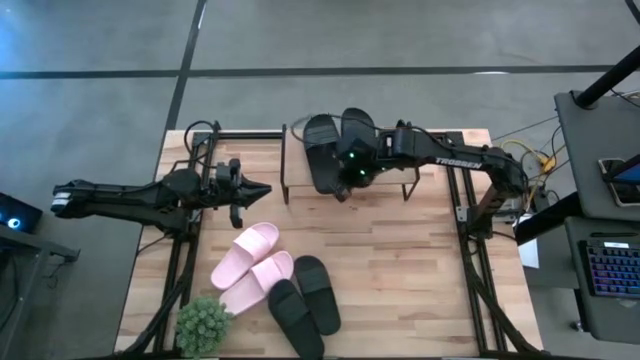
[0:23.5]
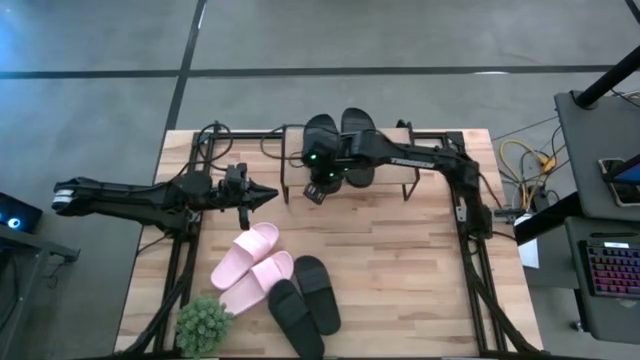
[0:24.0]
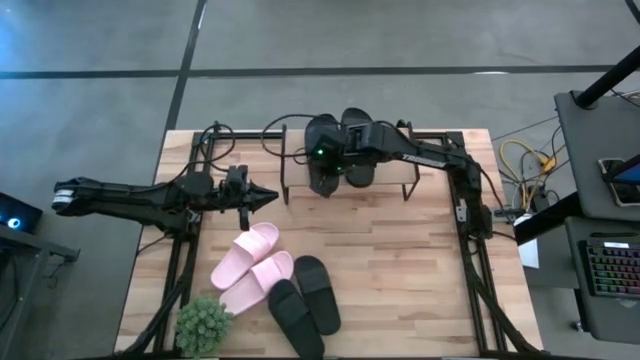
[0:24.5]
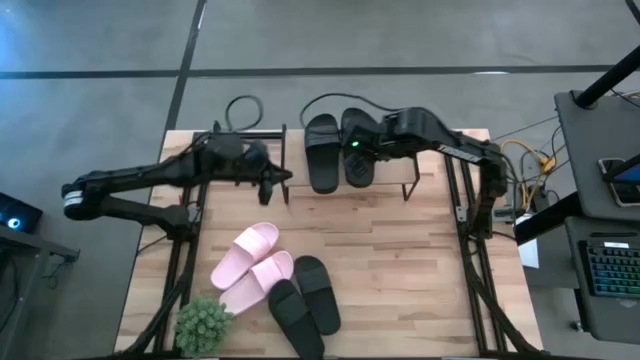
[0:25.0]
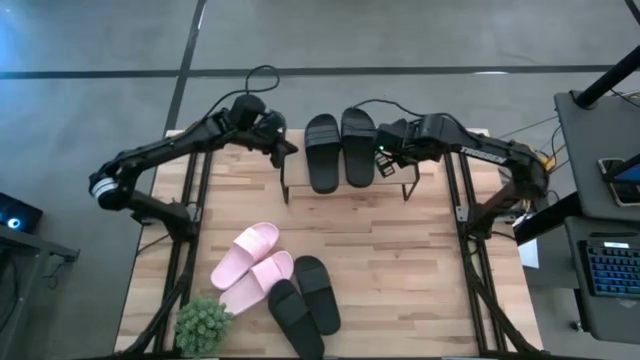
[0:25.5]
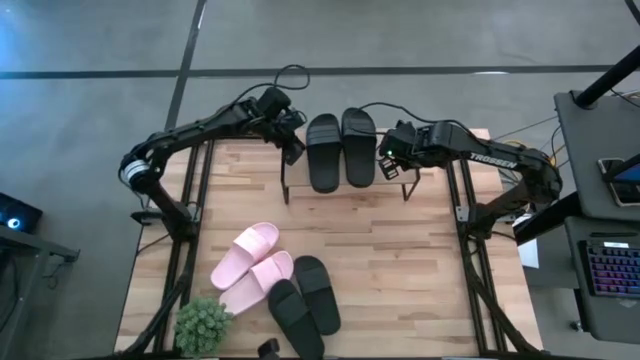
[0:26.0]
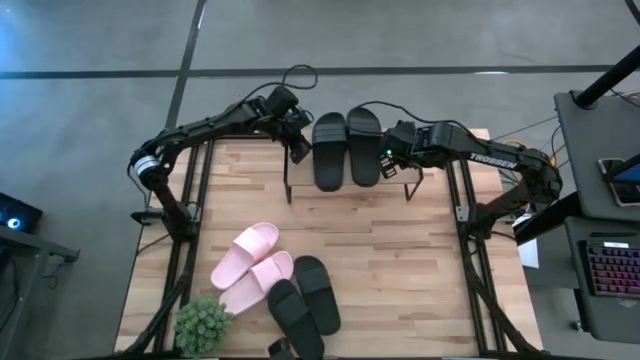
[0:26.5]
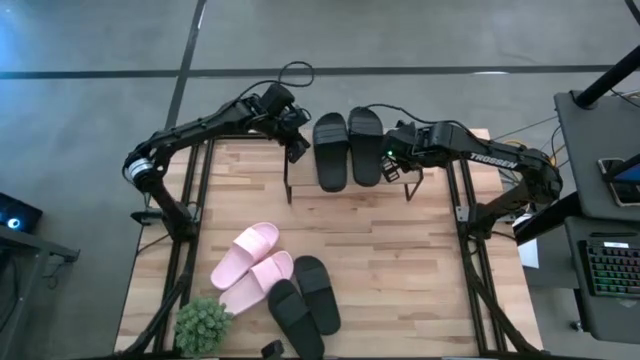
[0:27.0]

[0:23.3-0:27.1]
Task: Pick and place slides into the shelf
Adjust the left black slide on the shelf

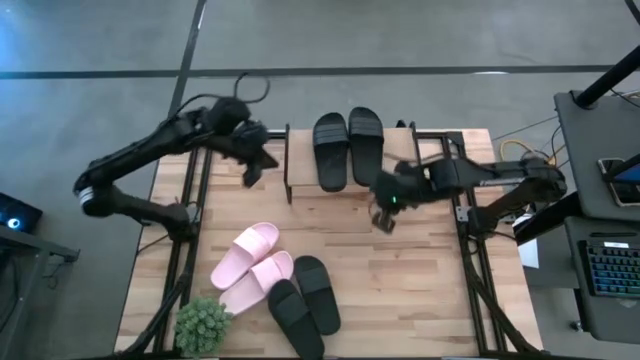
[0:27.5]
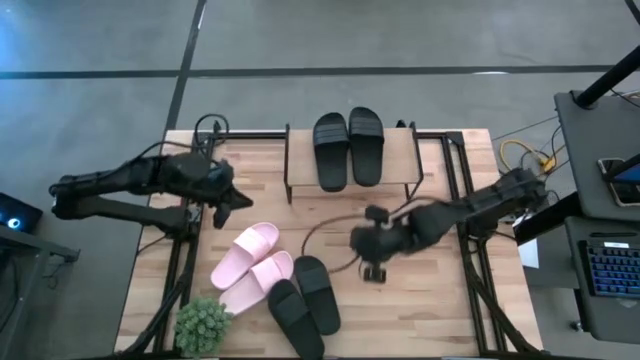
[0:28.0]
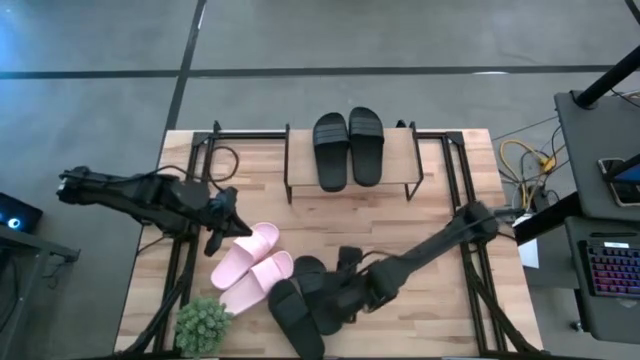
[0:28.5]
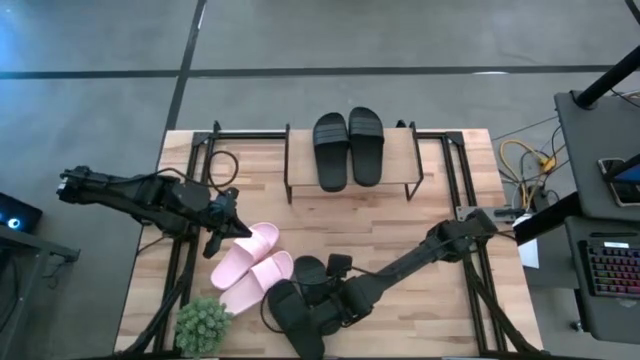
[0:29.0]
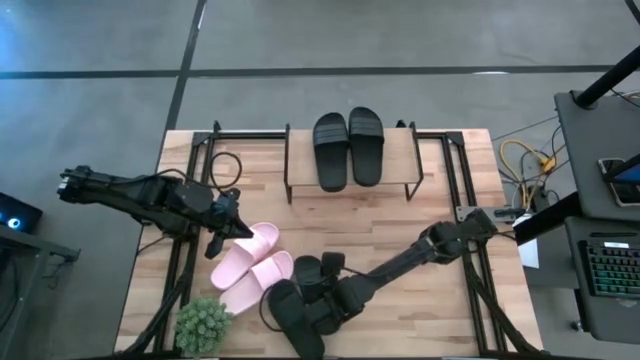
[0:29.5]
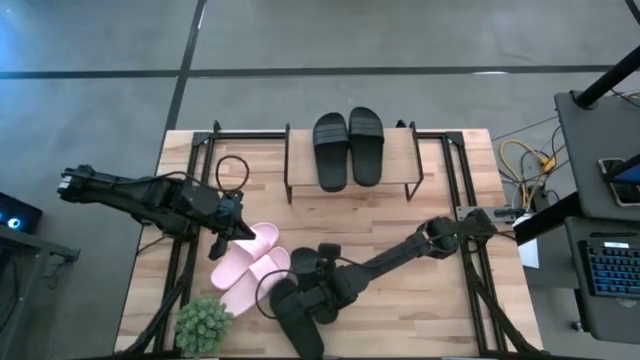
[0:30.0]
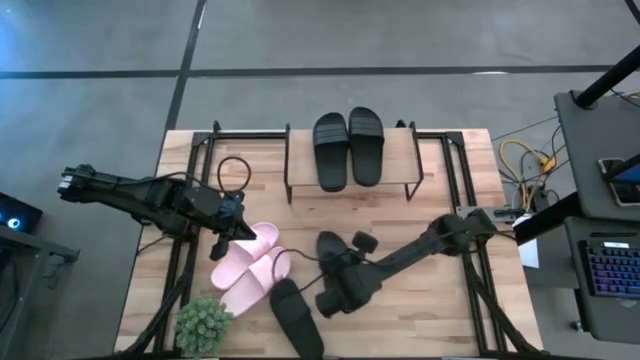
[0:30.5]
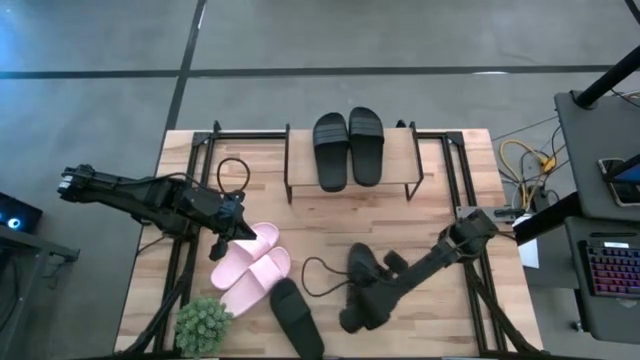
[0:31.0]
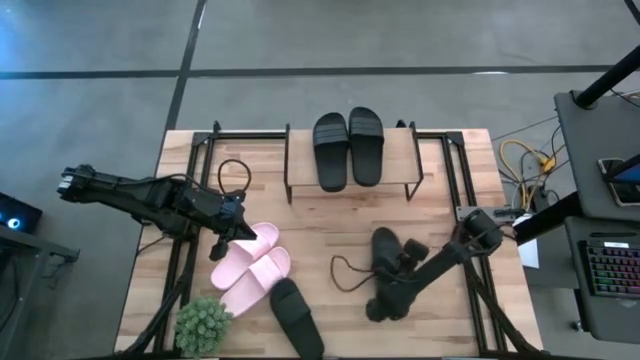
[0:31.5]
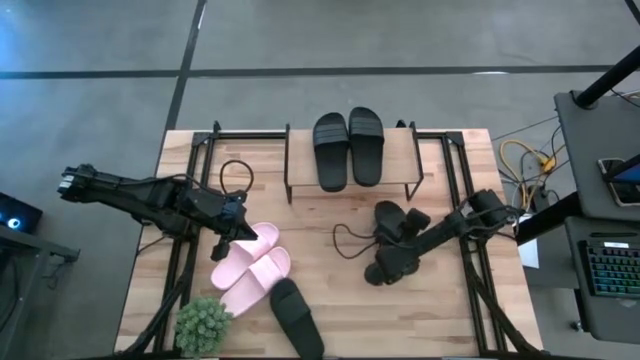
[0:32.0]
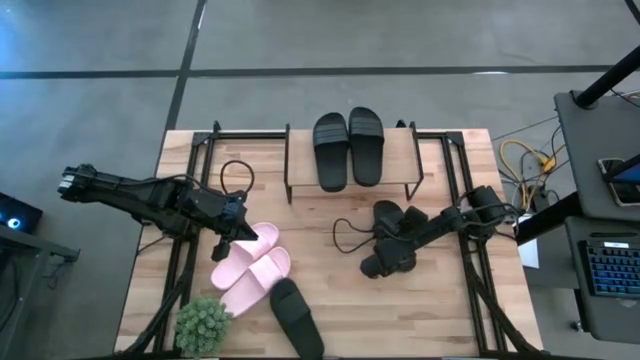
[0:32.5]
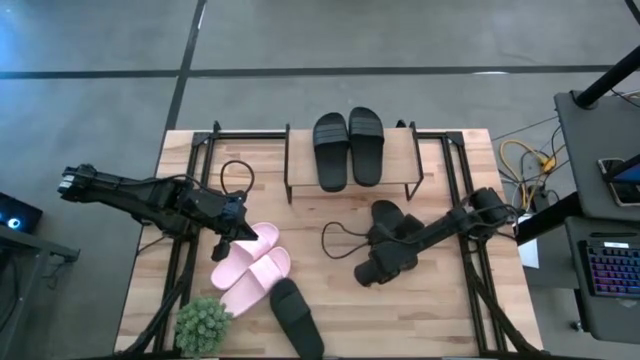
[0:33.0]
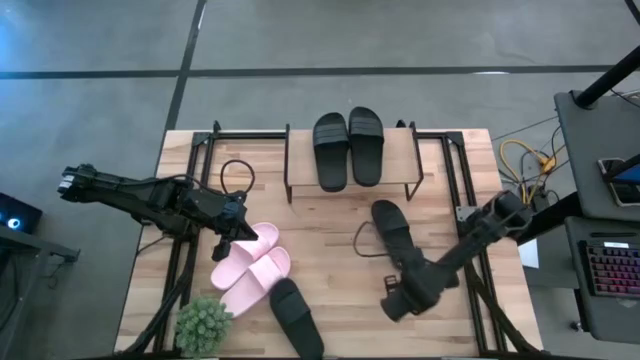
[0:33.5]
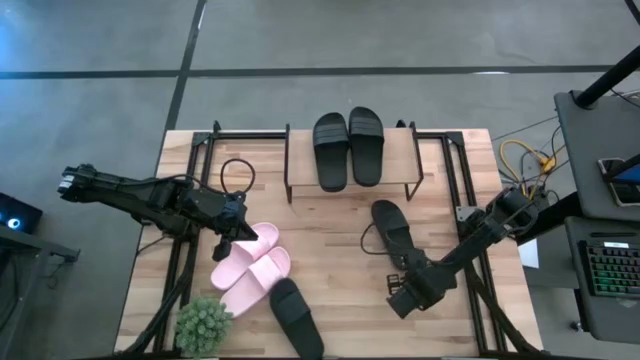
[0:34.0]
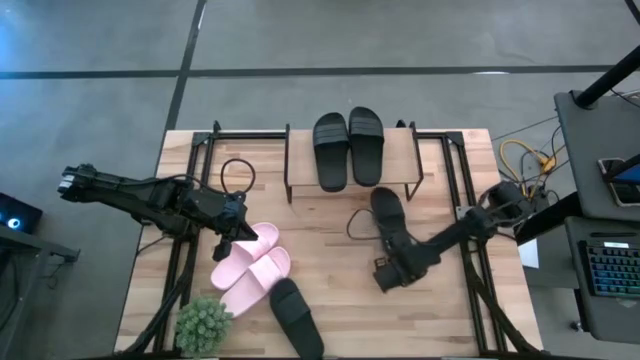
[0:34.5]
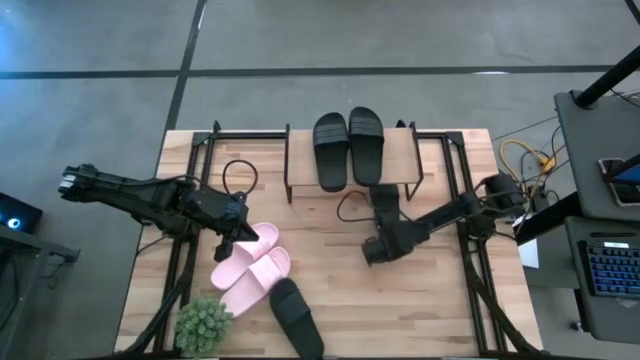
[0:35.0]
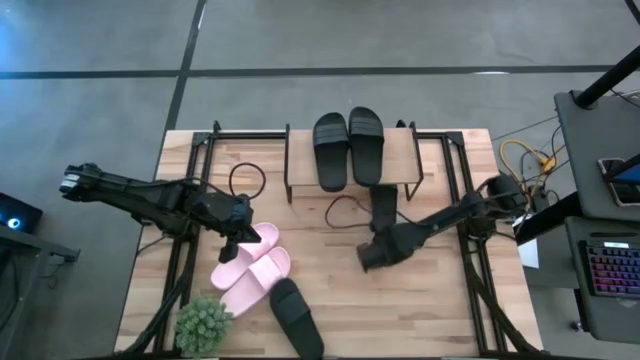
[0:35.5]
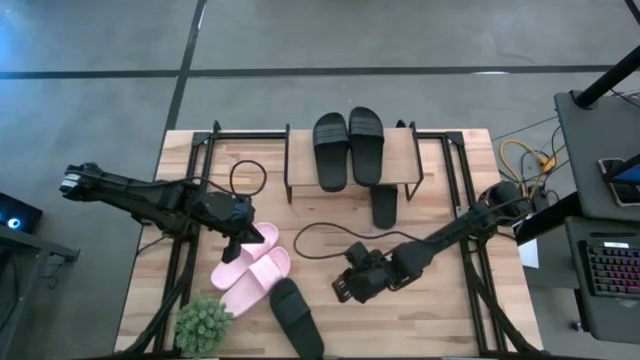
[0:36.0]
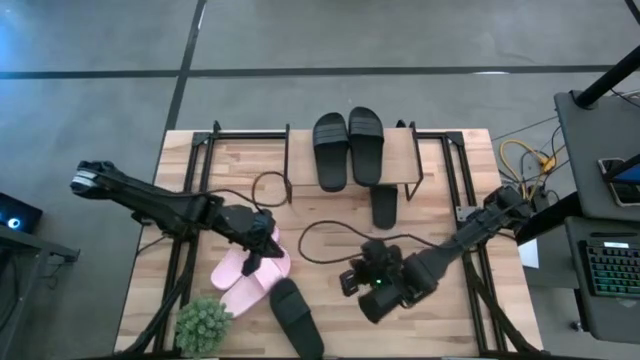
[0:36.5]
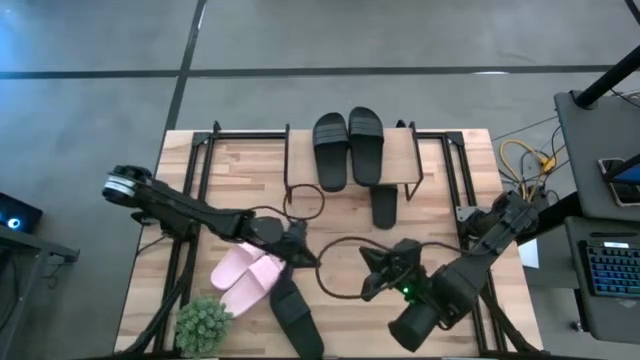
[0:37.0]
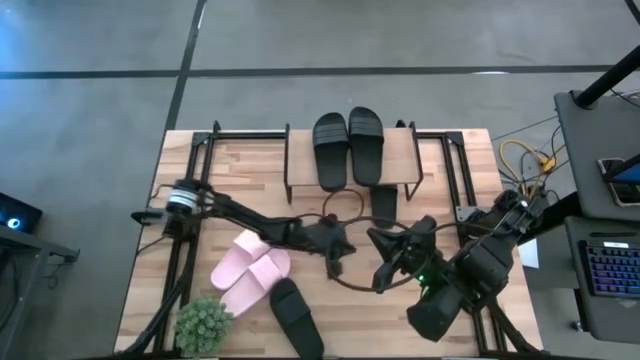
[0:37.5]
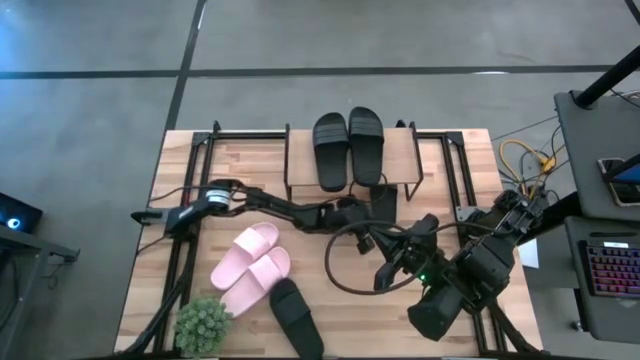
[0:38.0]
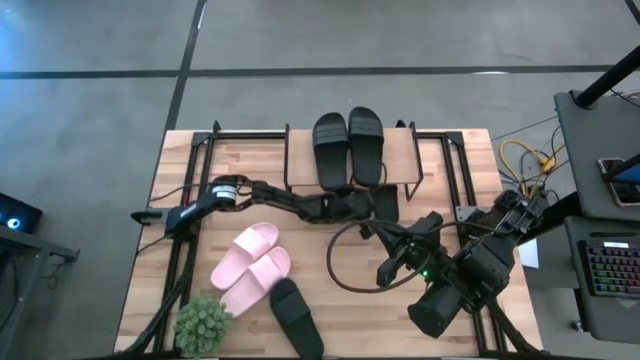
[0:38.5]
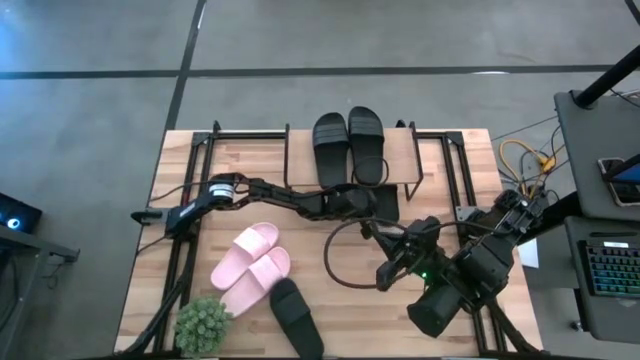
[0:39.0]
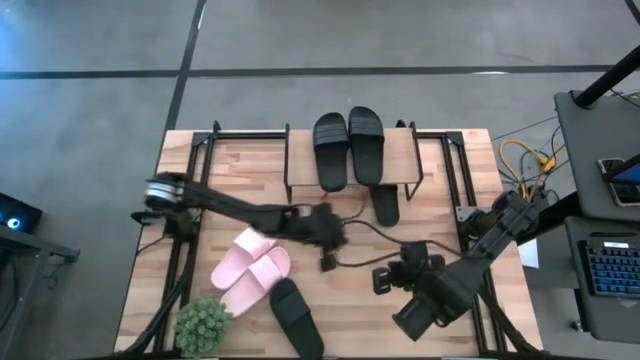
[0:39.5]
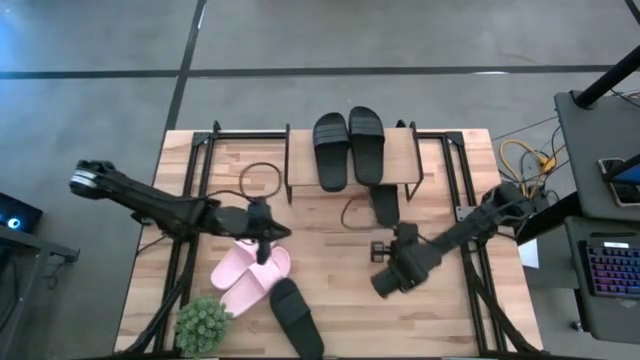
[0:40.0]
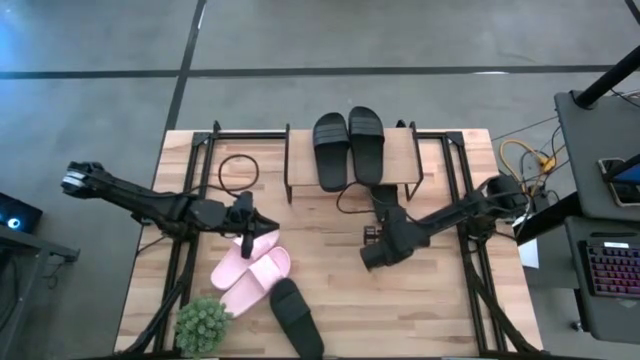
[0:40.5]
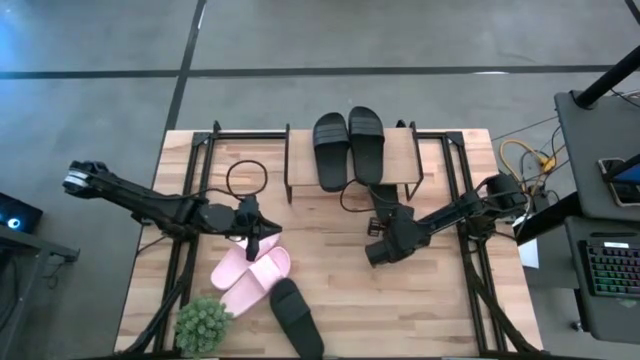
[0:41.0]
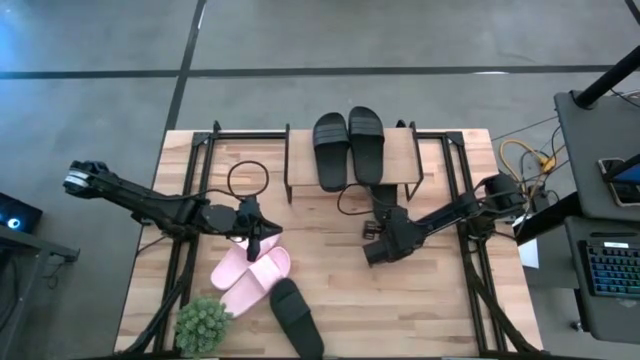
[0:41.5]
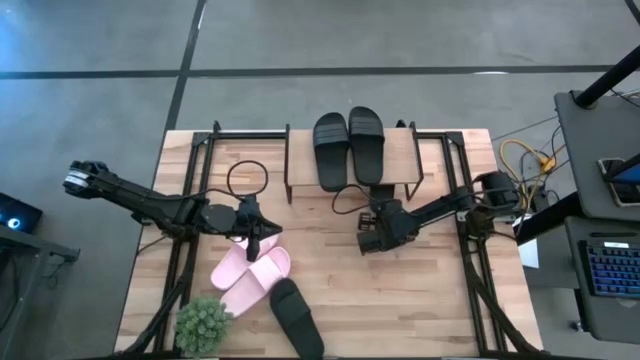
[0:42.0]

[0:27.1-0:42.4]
Put the right black slide under the shelf

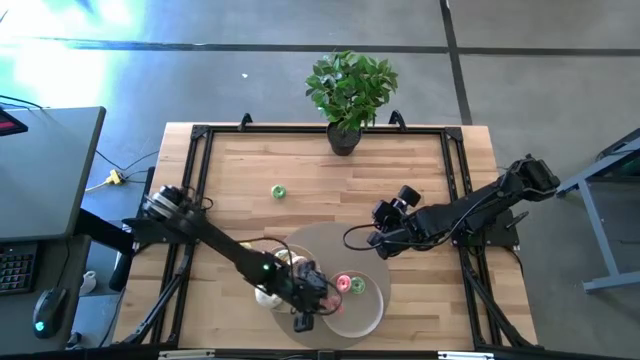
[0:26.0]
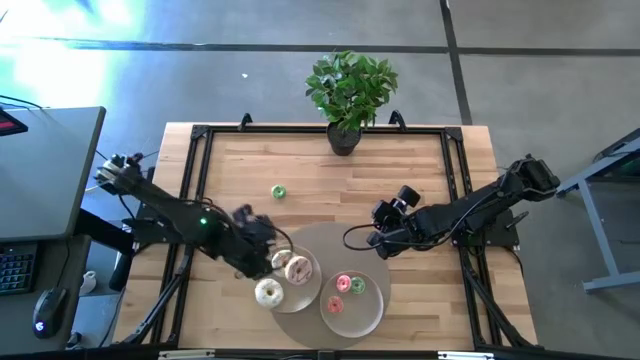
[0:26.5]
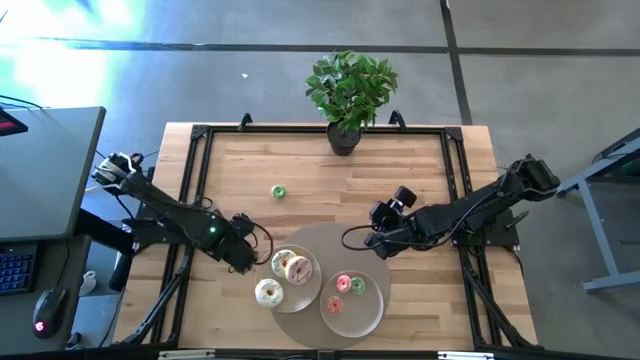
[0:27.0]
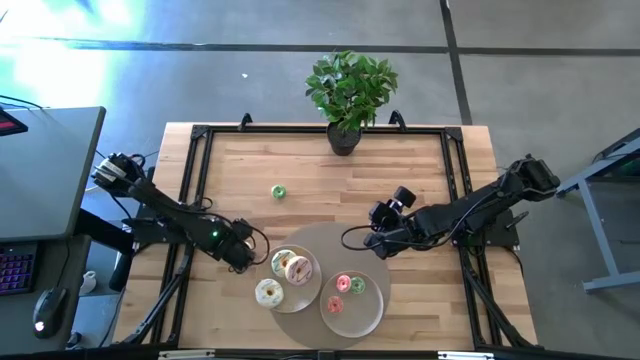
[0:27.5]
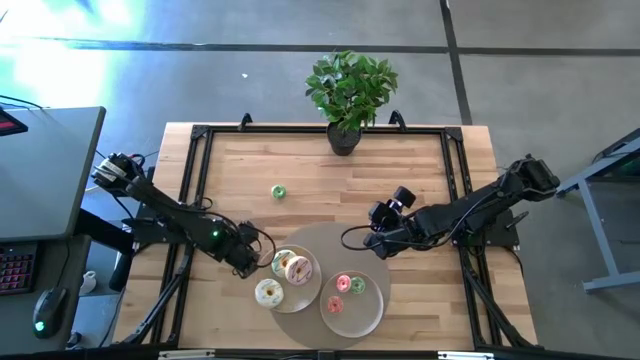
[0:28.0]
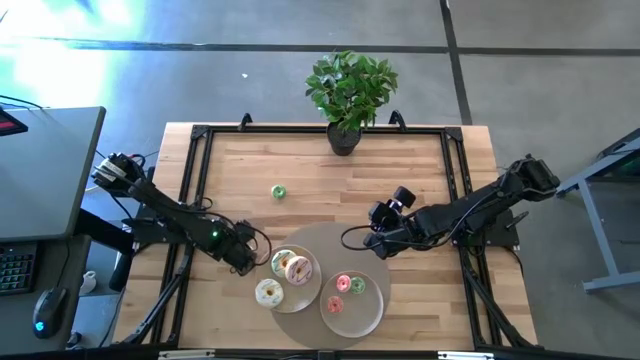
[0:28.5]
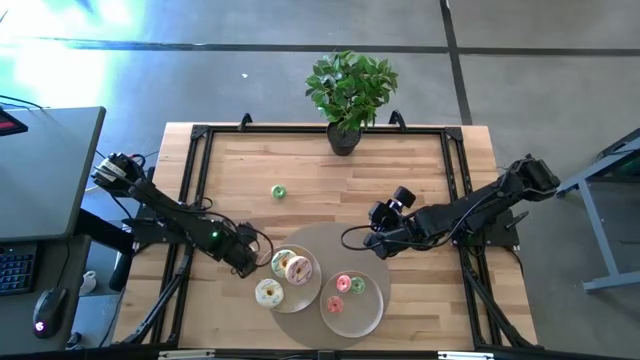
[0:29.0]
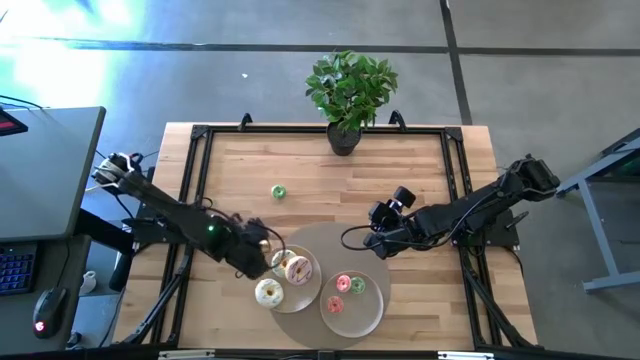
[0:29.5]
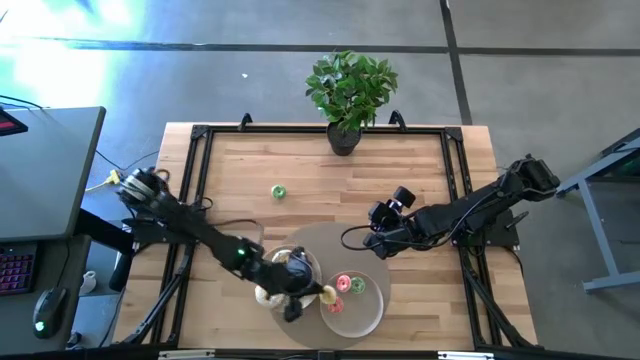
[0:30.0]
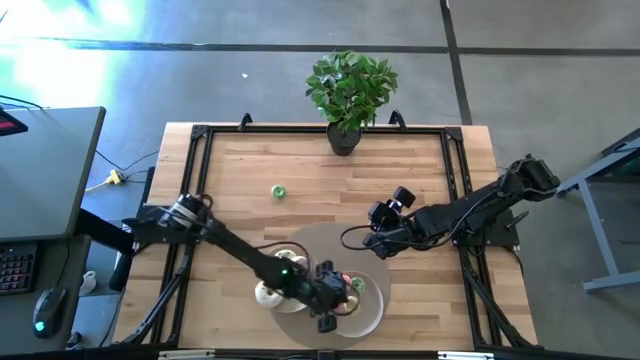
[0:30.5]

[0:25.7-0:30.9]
Task: Pick & Place donuts
Put the small yellow donut on the right white plate
